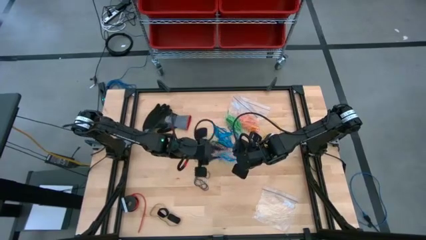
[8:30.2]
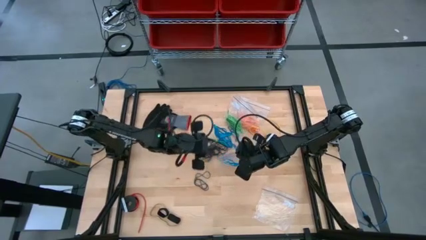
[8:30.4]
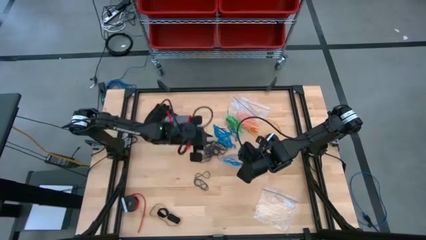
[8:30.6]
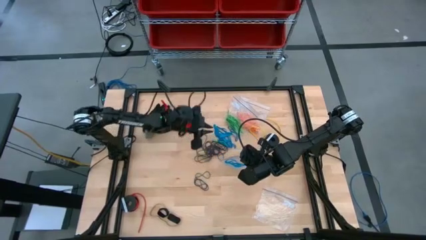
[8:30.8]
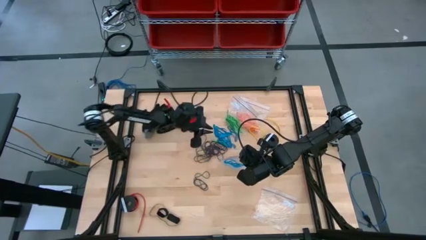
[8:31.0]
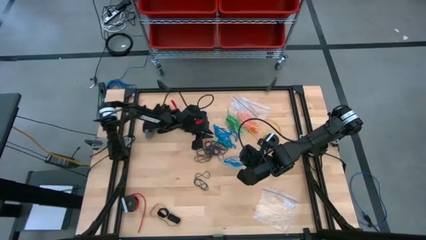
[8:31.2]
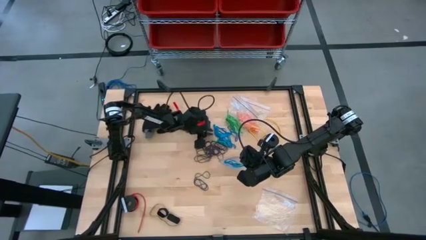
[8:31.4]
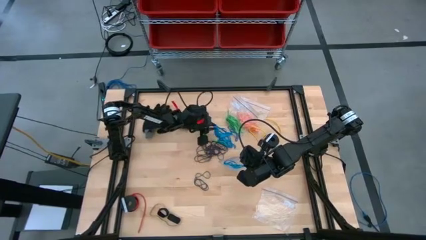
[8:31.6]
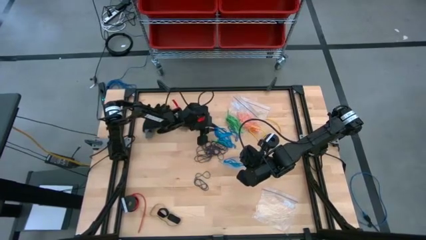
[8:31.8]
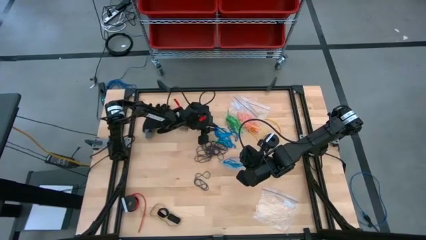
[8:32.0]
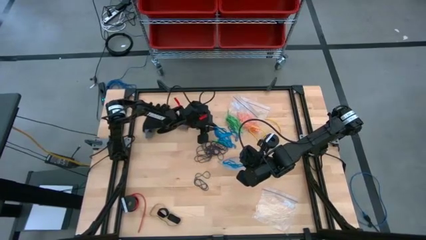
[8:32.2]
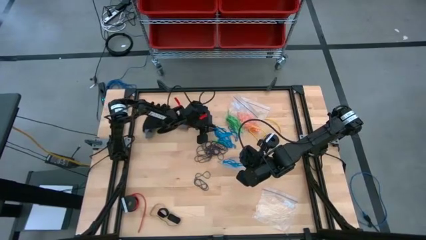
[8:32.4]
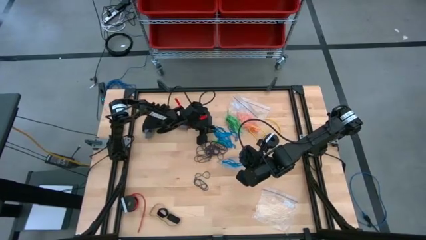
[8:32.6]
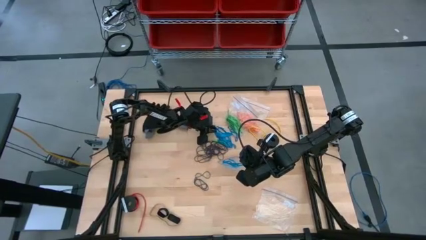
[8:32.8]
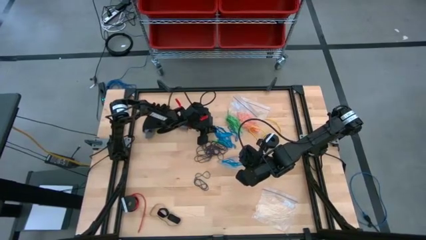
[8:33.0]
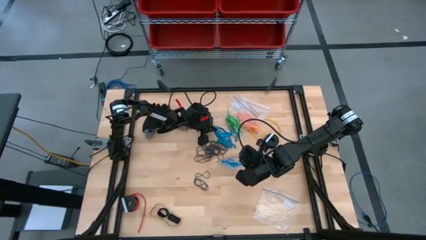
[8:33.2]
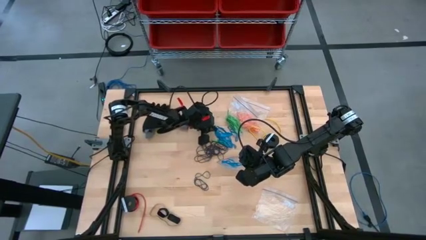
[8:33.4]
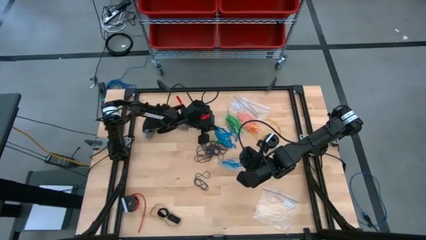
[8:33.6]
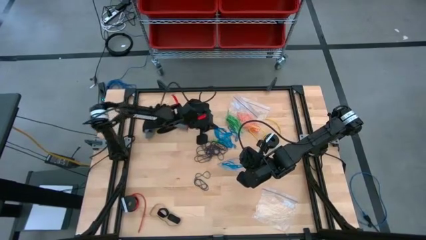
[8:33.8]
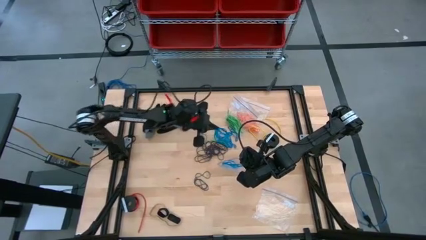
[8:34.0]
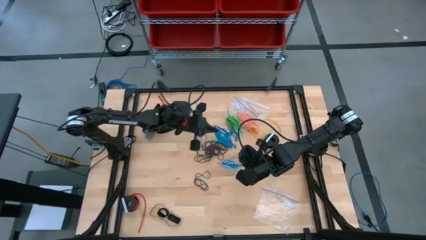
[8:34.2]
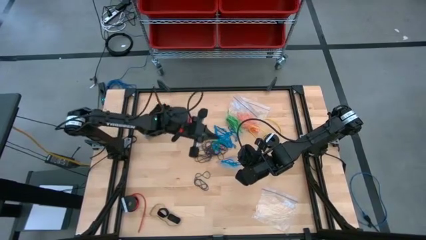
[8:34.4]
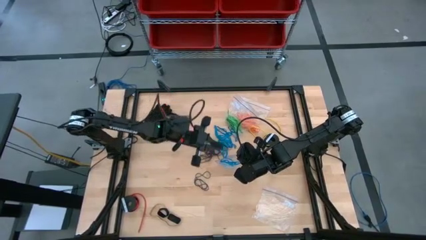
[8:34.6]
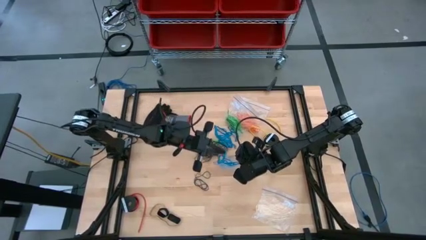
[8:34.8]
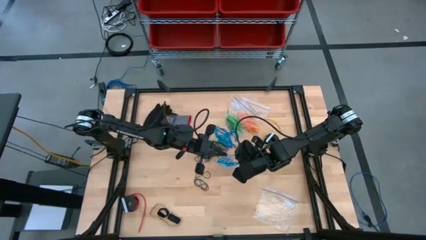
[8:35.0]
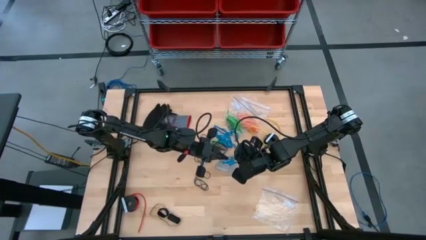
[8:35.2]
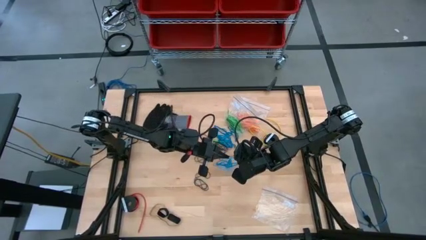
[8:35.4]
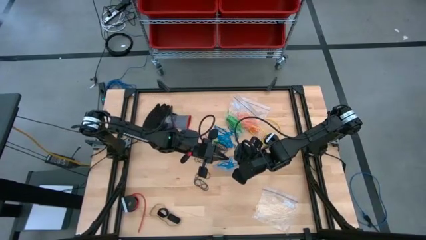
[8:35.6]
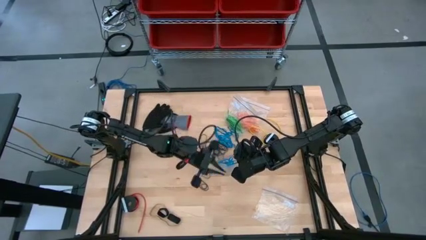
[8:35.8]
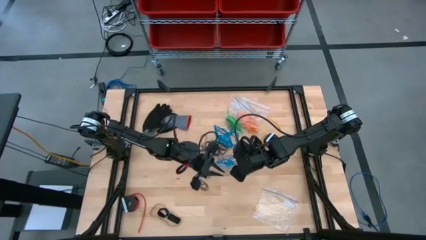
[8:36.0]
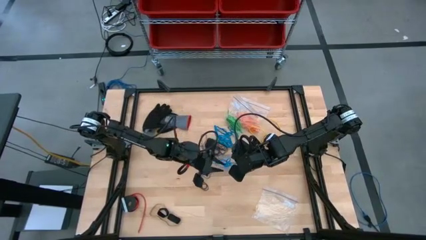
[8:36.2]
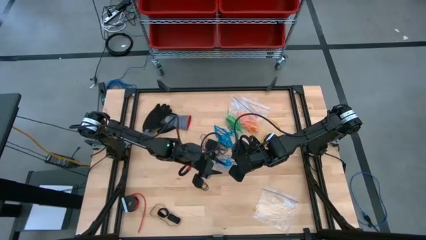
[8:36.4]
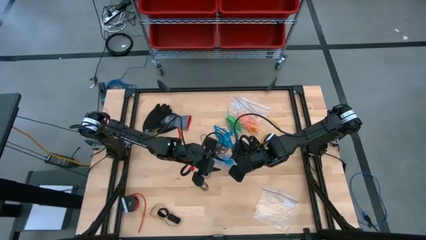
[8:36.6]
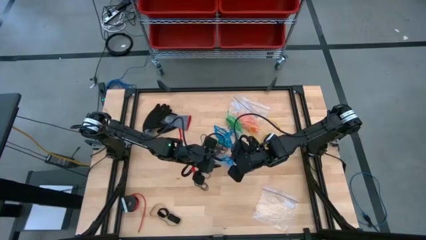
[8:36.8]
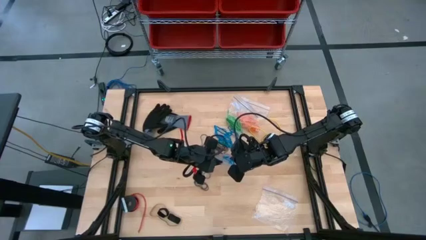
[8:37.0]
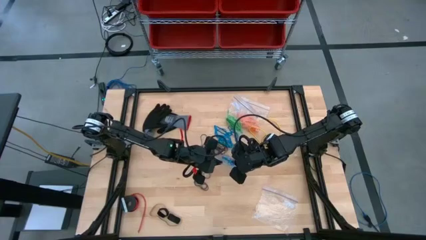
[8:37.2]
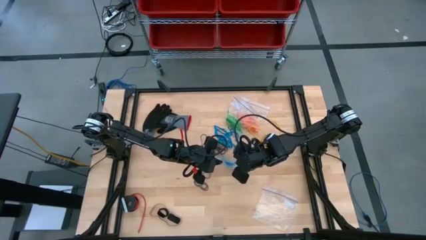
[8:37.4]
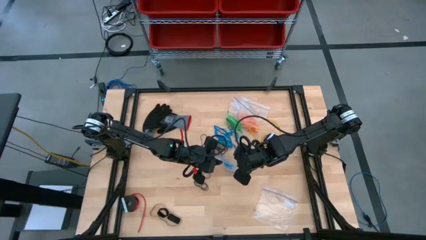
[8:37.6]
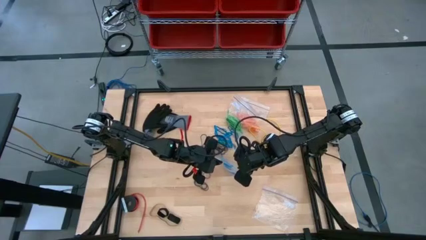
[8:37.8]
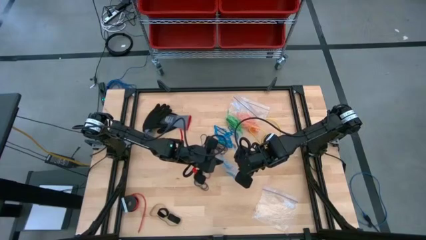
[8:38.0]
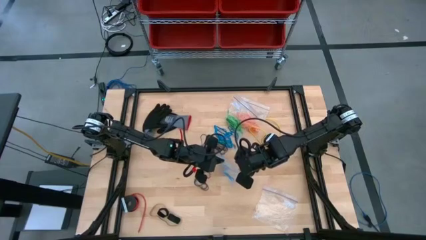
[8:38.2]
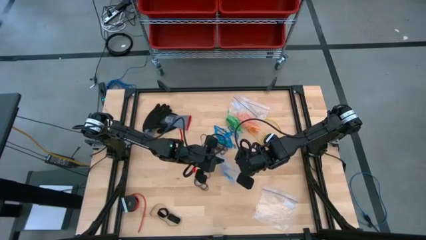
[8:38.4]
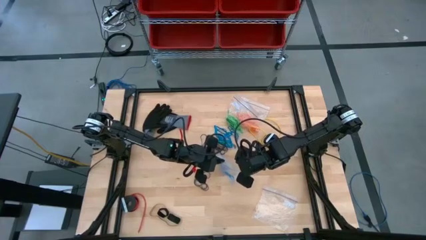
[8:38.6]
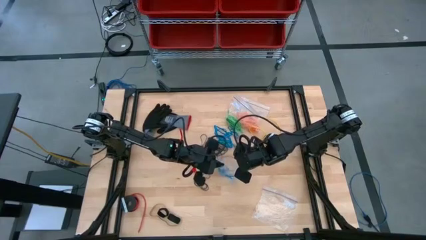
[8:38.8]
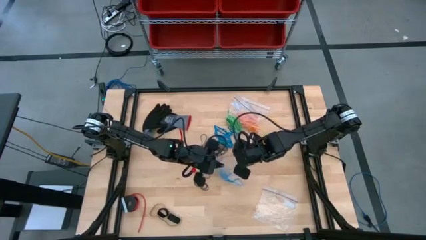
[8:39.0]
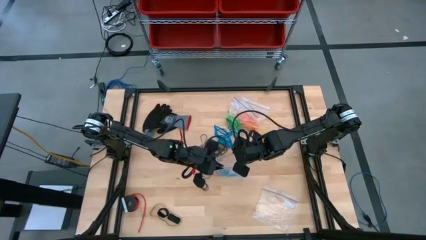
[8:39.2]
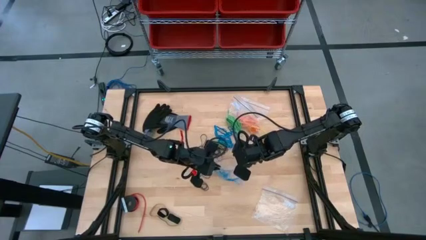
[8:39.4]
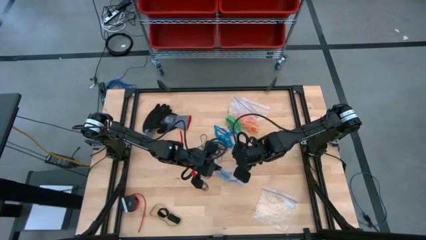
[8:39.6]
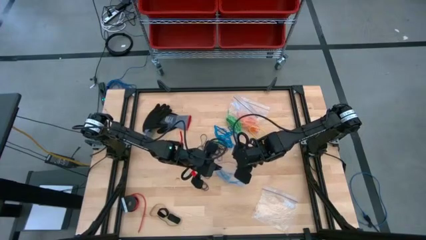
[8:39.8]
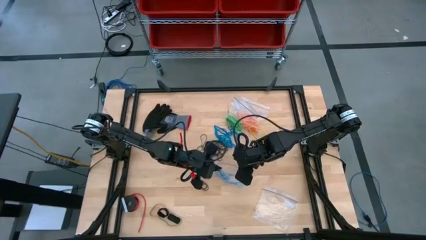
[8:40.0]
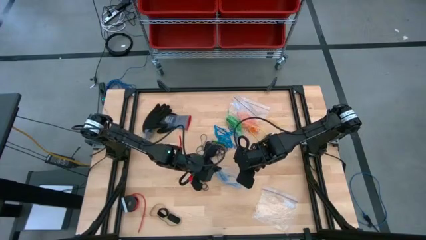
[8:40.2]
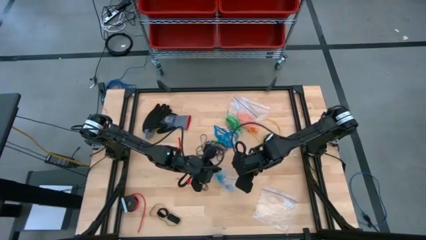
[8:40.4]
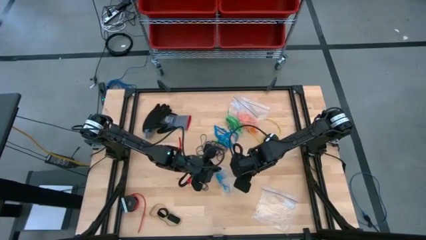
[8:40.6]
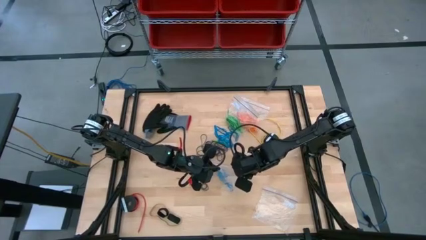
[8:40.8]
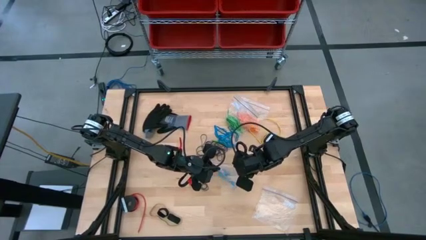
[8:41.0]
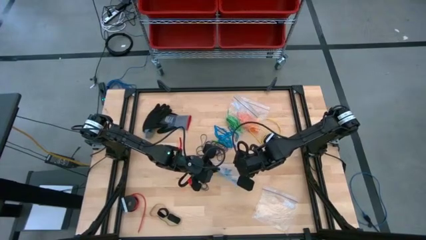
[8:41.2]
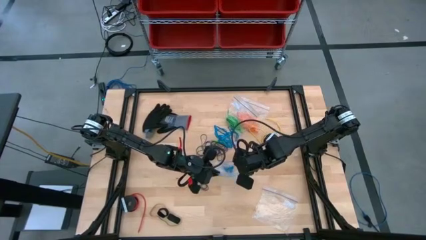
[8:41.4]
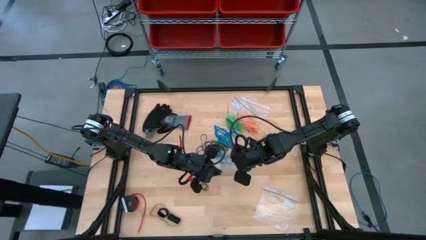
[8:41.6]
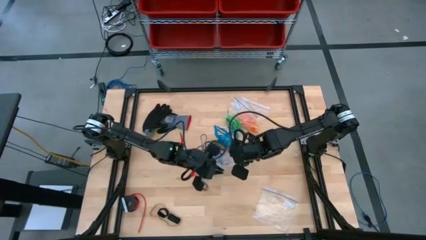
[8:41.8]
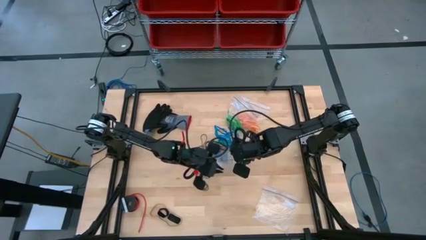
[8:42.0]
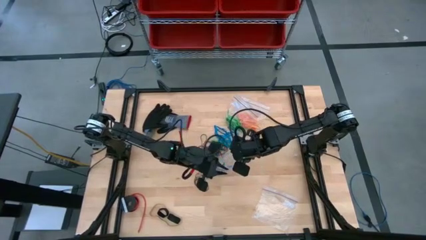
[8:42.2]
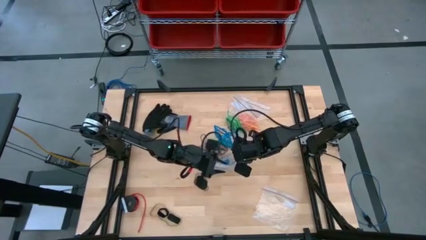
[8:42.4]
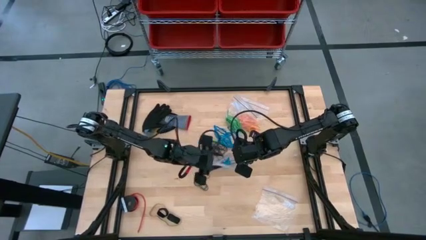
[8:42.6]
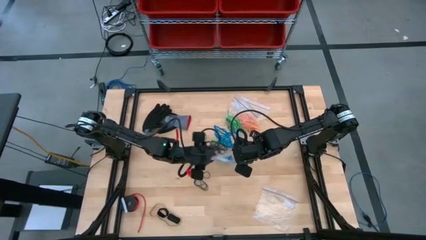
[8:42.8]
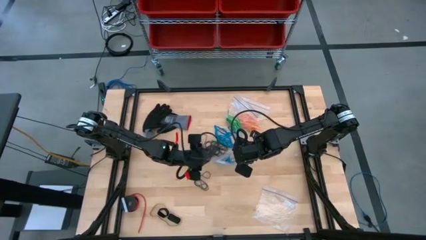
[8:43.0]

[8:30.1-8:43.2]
Task: Sort rubber bands
Put the blue rubber band into the transparent zip bag

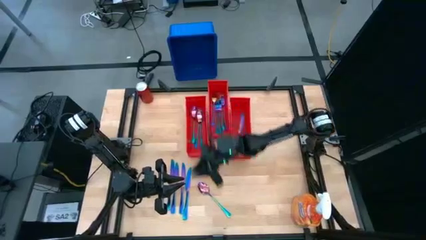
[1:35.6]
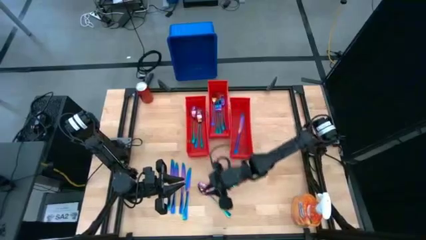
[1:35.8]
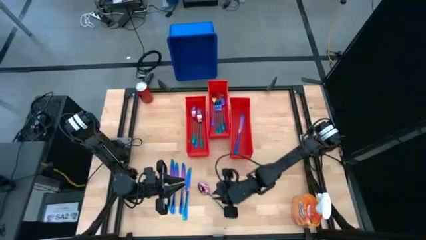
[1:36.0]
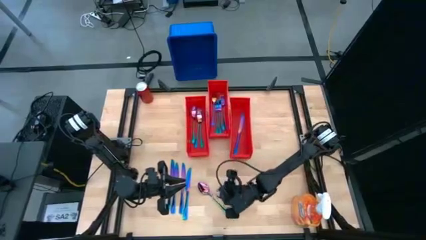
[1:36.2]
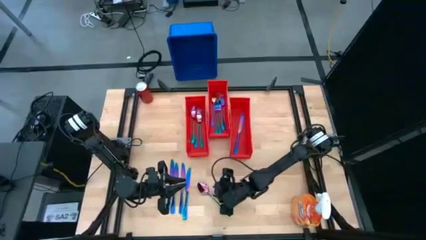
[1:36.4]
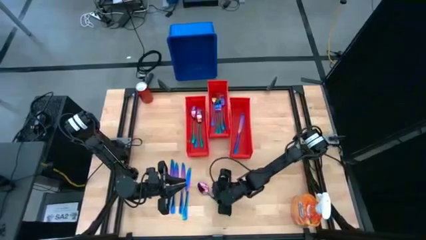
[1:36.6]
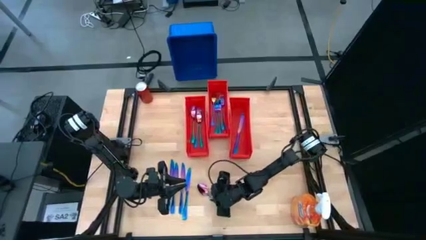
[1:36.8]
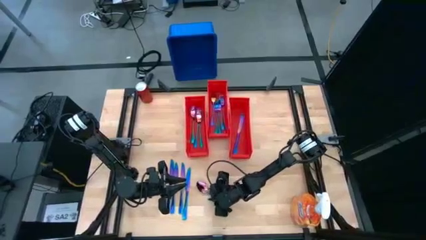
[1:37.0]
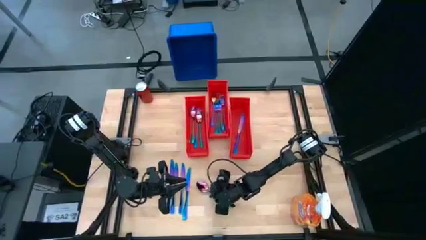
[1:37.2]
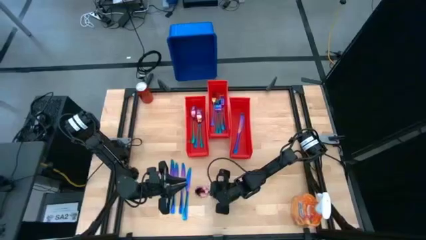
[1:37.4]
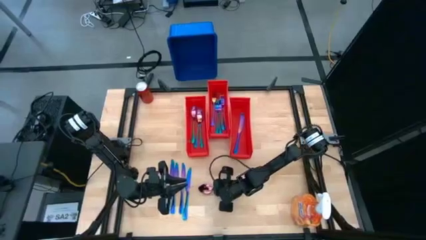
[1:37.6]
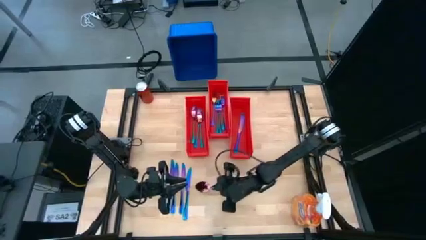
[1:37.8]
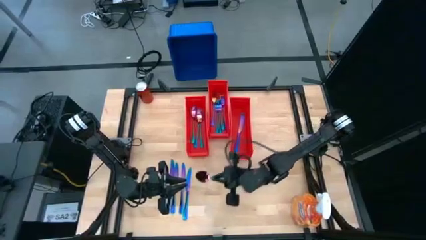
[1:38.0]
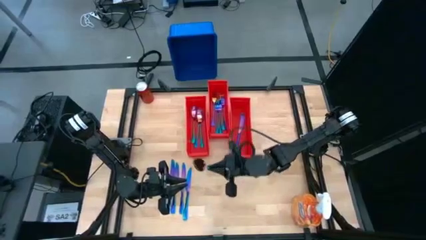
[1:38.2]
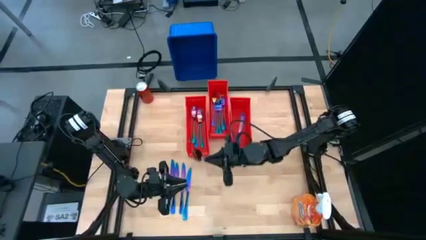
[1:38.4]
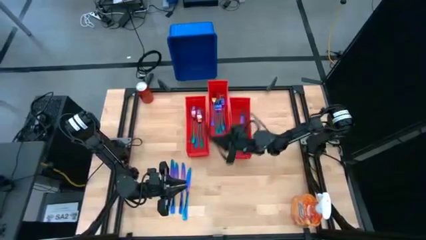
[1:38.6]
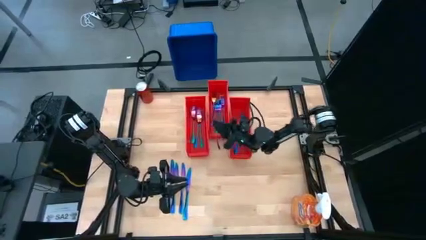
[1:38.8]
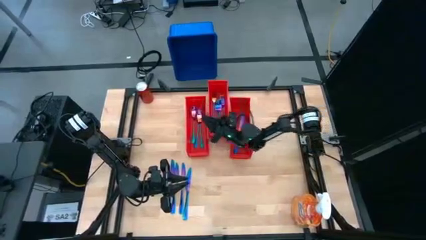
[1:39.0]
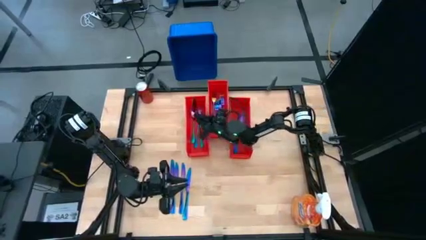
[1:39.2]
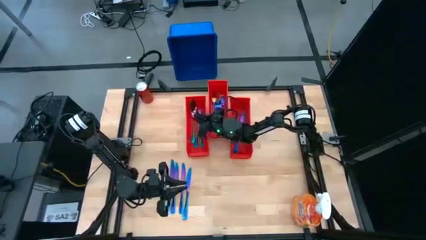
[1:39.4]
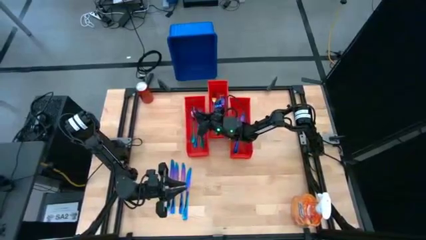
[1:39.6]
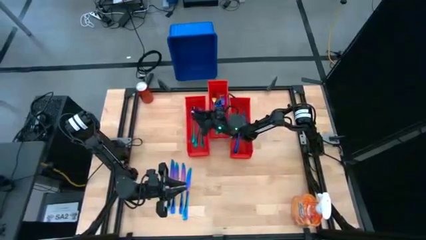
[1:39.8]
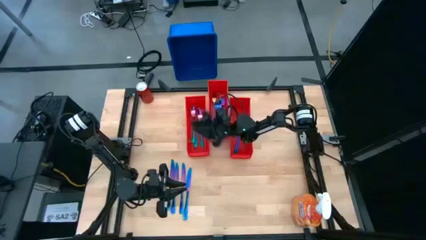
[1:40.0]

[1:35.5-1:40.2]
Task: Sort silverware
Put the iridescent spoon into the left orange bin
